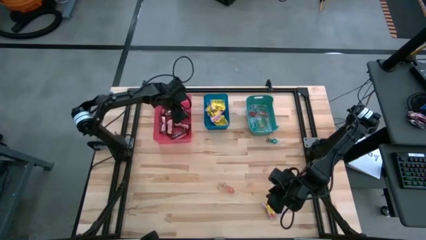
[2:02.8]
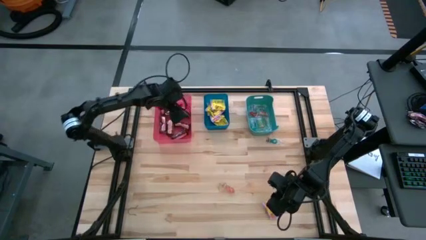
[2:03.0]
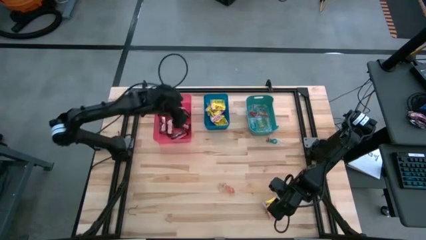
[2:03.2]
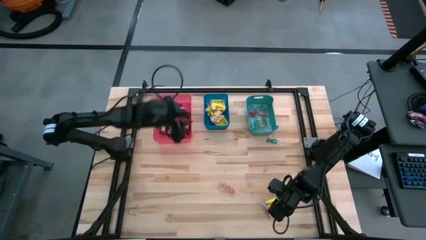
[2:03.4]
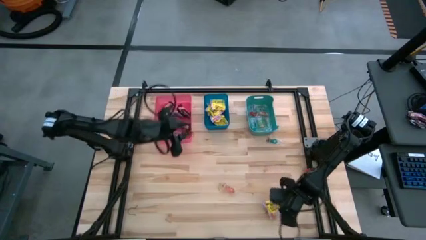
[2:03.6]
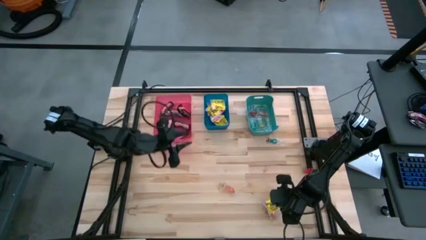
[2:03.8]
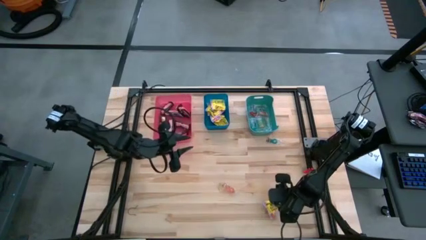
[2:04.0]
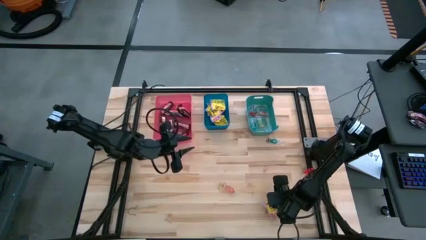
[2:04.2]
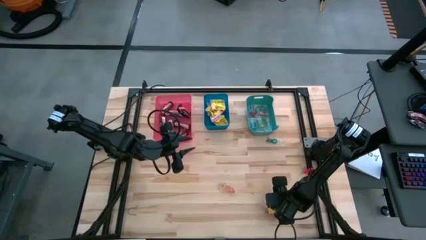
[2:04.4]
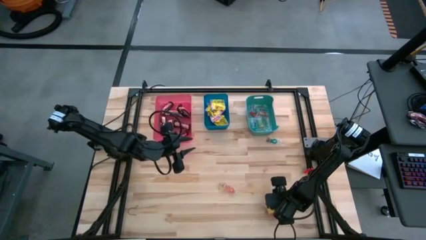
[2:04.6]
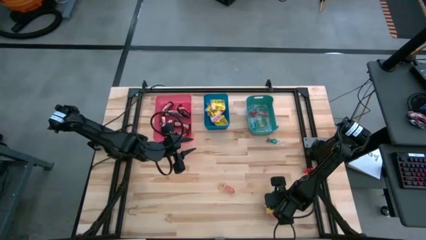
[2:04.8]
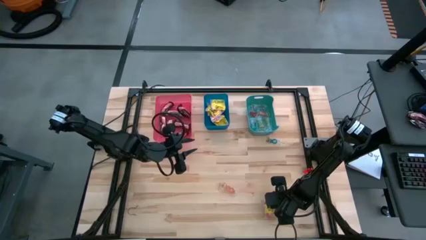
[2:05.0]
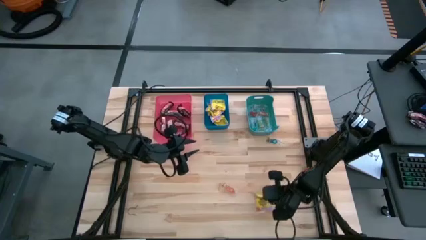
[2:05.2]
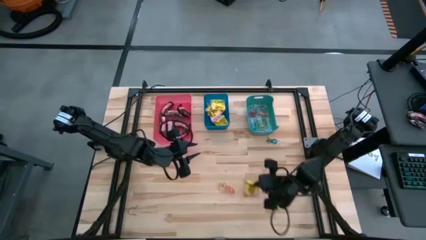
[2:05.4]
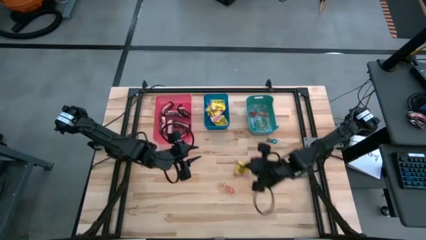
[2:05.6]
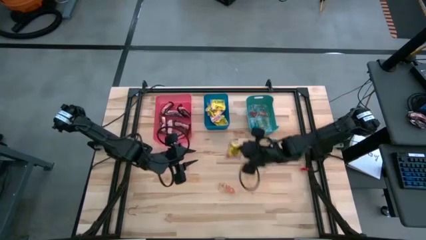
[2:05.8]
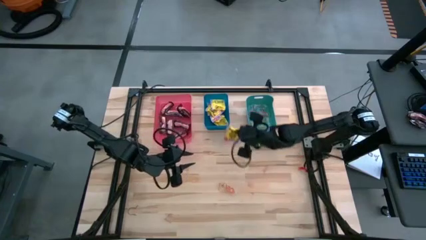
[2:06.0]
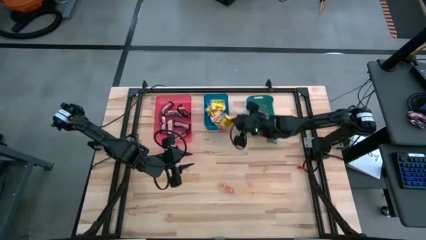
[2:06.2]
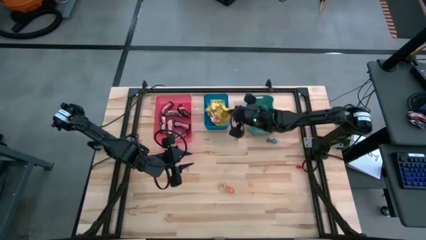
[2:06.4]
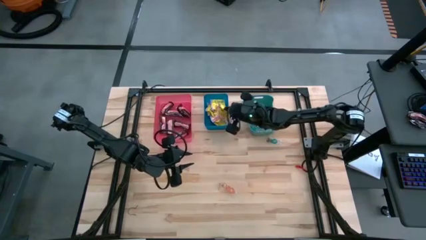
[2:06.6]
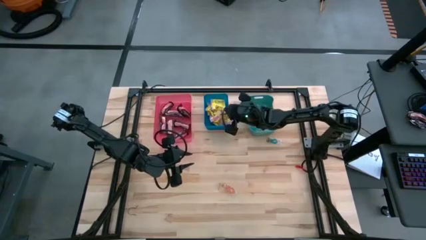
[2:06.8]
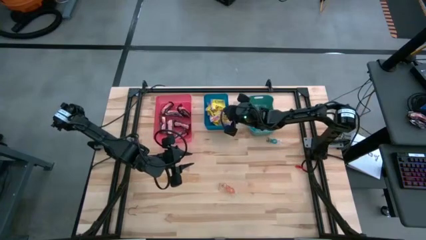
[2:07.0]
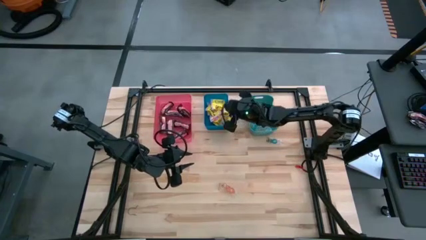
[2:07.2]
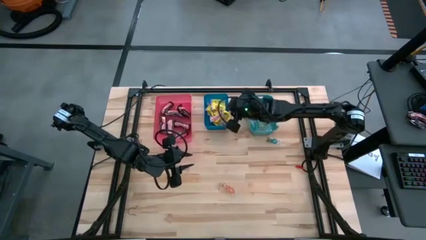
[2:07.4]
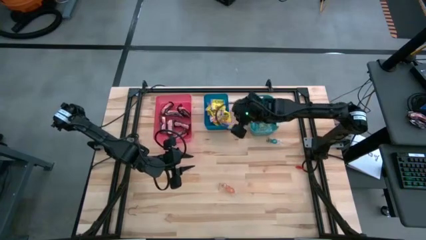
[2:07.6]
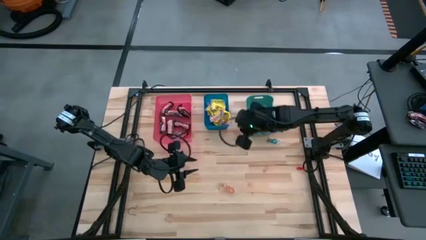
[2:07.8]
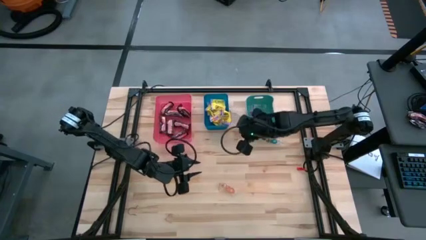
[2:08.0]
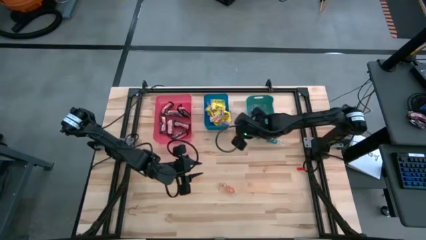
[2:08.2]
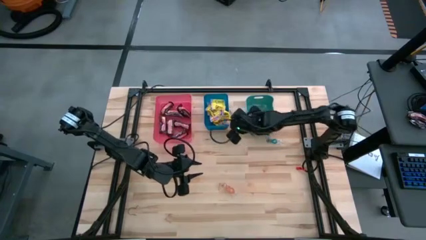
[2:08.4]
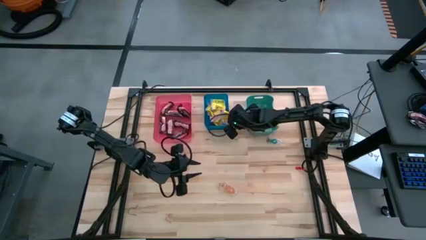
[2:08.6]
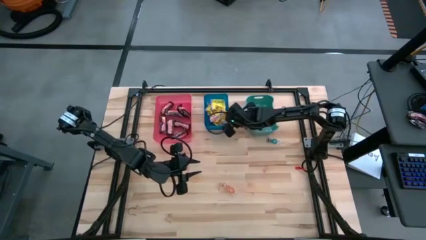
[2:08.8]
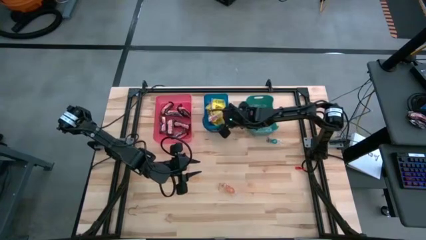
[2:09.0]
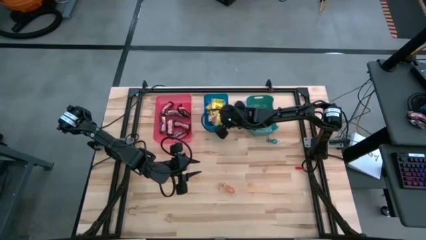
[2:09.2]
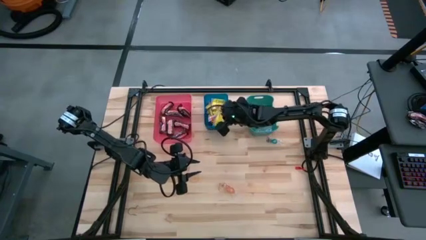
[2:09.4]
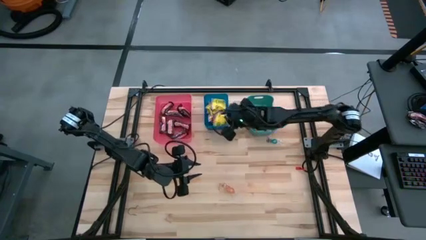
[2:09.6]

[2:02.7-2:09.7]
Task: Sort candy
Put the yellow candy into the blue bin

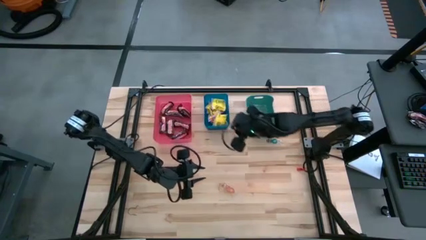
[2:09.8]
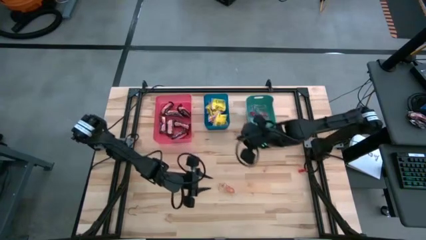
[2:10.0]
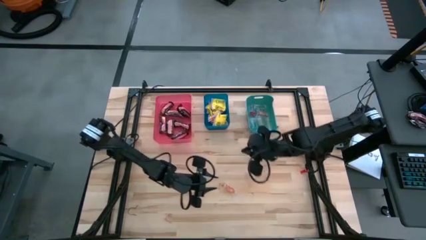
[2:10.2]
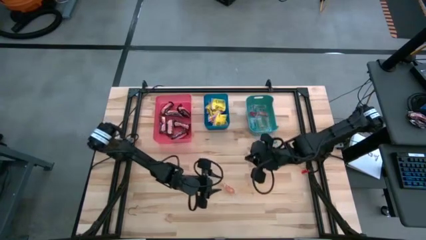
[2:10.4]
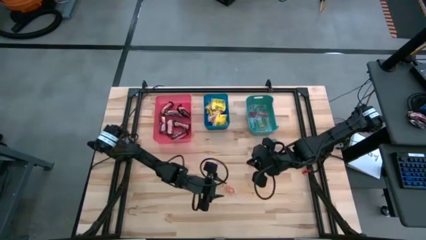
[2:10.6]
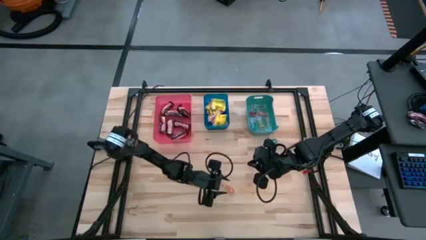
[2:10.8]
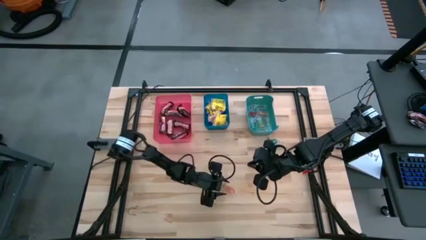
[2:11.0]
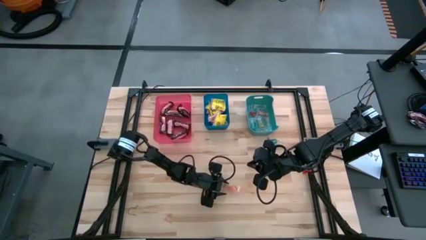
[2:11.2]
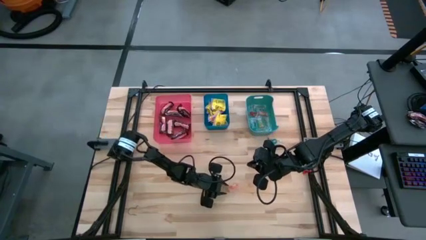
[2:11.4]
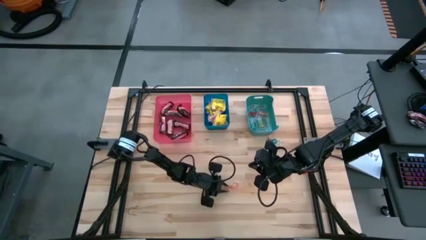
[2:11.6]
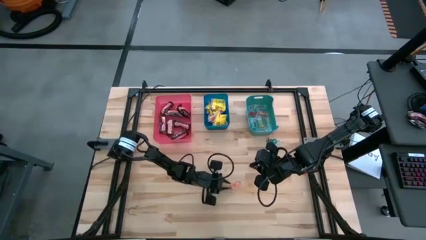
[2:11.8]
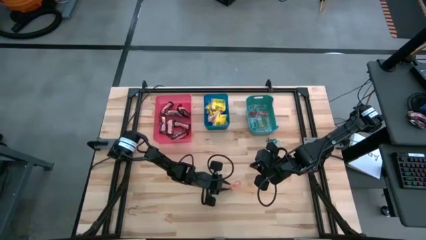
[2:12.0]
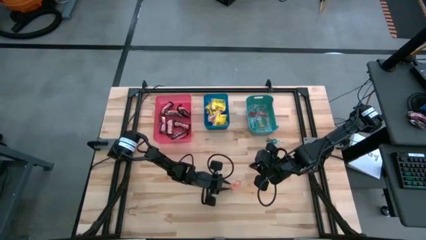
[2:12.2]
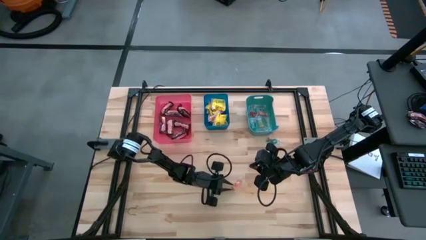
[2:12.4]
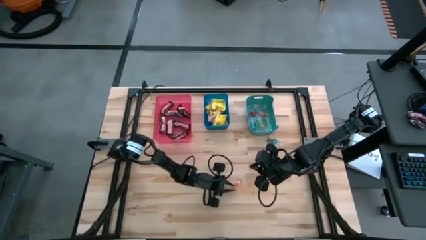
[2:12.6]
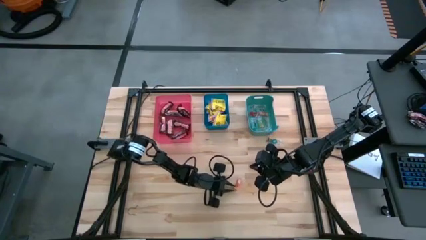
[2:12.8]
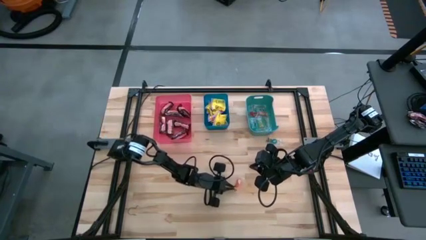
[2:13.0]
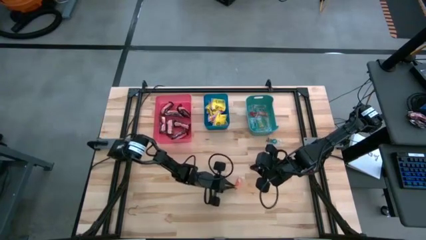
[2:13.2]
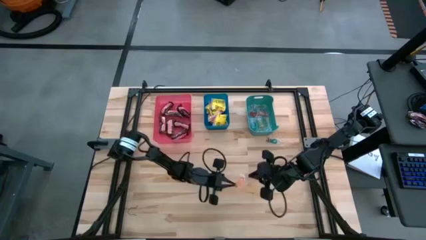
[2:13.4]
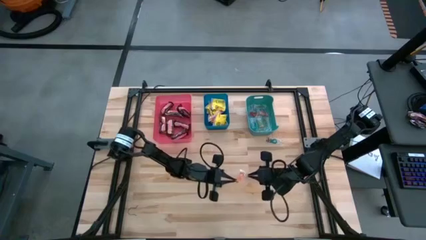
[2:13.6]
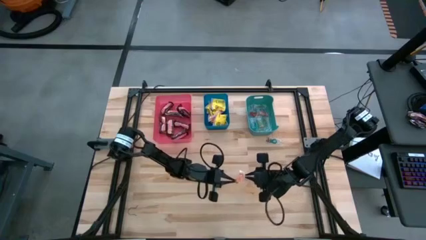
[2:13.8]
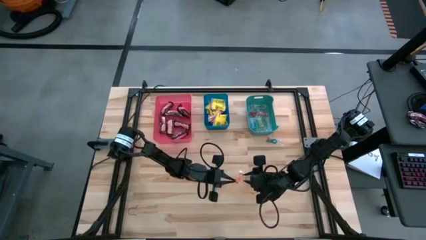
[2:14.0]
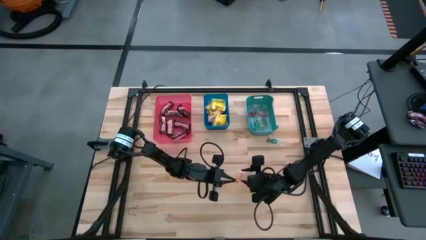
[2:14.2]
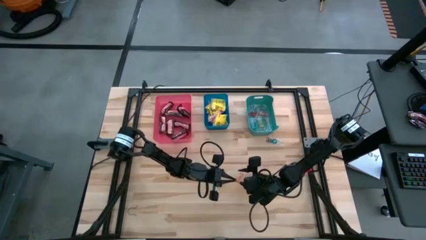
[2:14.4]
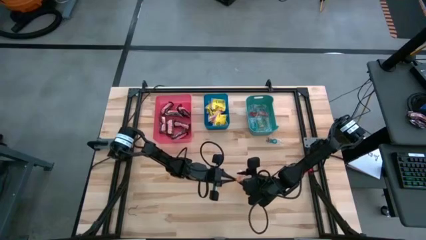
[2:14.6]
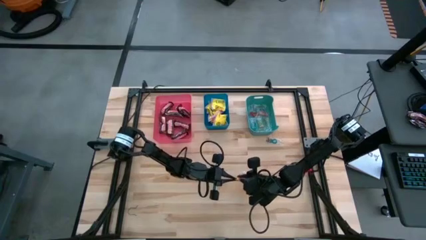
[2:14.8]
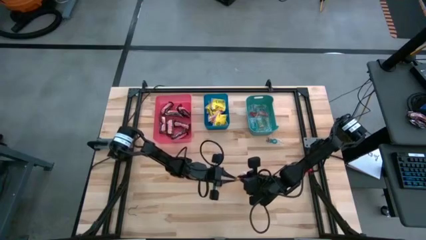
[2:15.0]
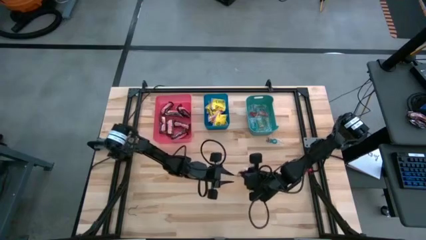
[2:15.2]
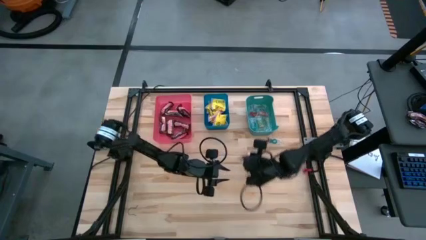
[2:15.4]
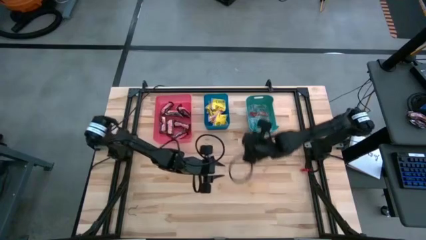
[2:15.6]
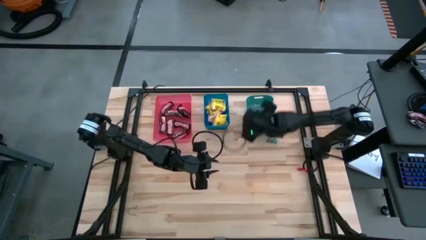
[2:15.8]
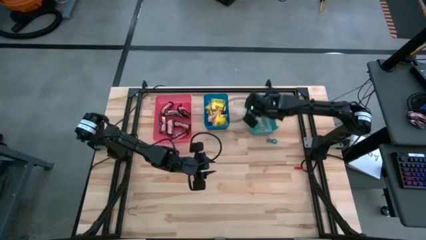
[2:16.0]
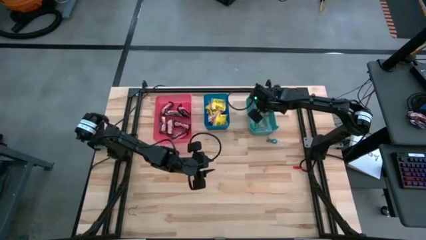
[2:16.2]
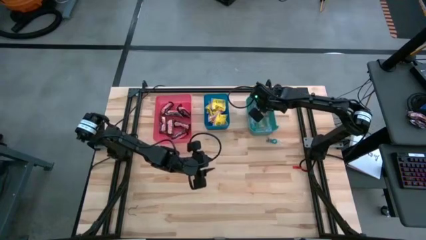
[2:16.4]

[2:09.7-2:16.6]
Put the orange gummy candy into the green bin

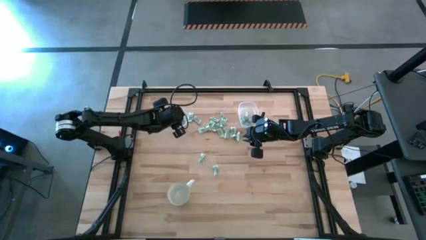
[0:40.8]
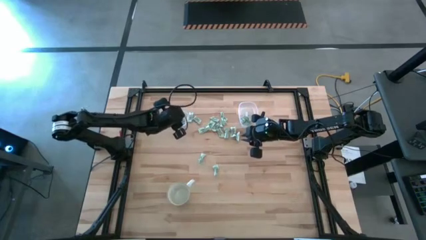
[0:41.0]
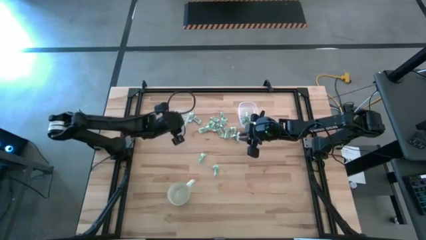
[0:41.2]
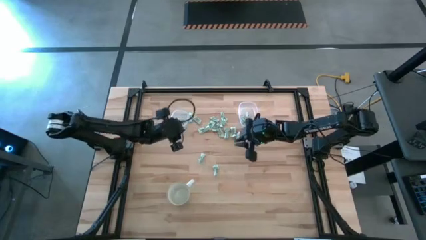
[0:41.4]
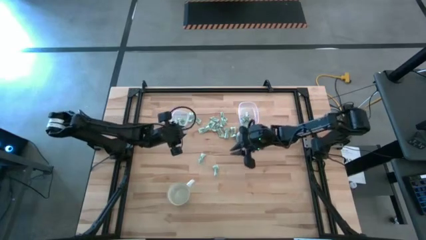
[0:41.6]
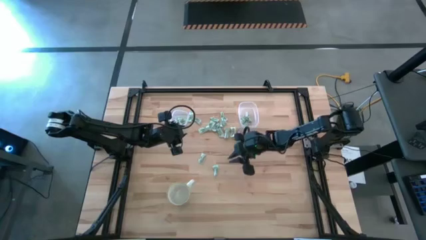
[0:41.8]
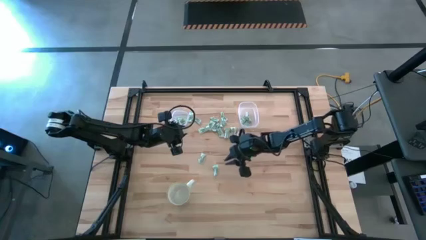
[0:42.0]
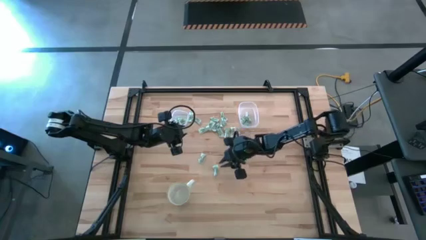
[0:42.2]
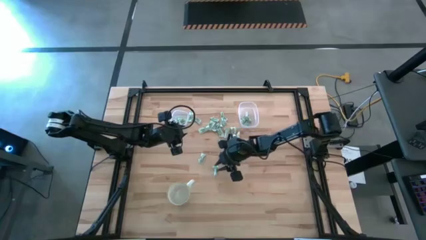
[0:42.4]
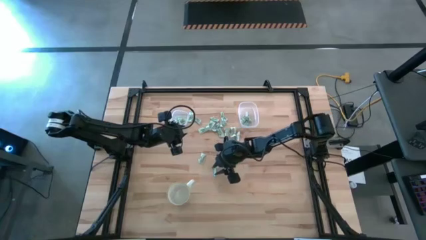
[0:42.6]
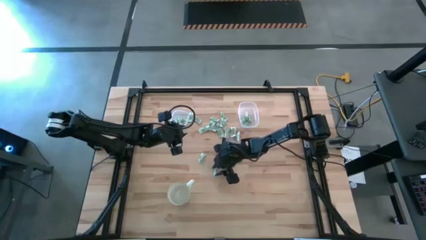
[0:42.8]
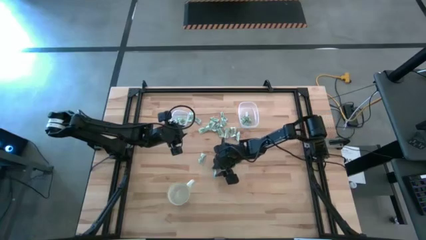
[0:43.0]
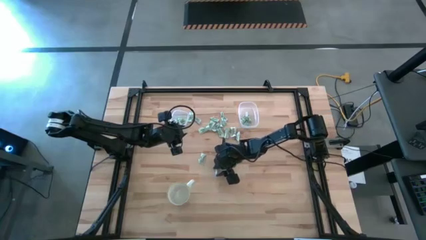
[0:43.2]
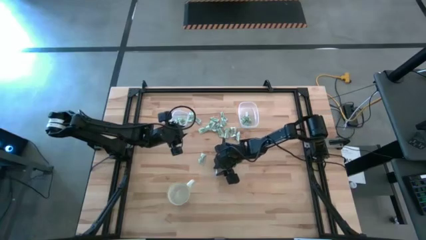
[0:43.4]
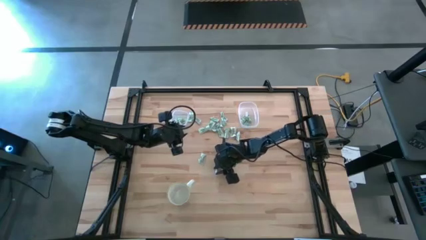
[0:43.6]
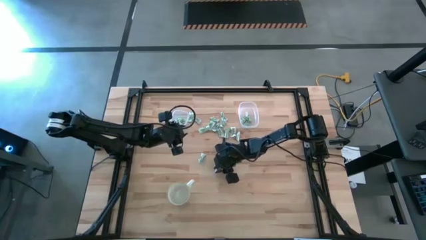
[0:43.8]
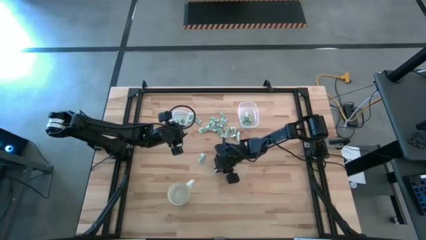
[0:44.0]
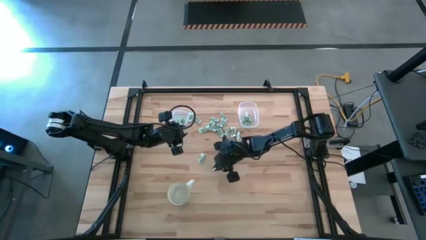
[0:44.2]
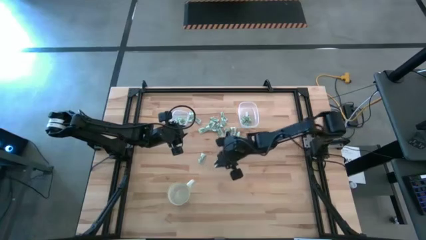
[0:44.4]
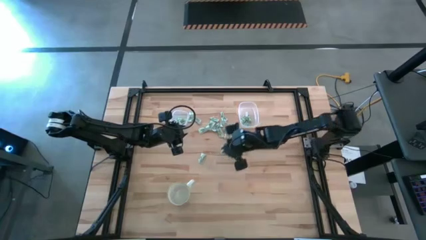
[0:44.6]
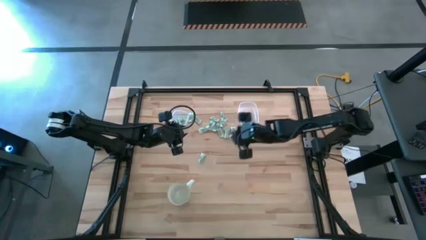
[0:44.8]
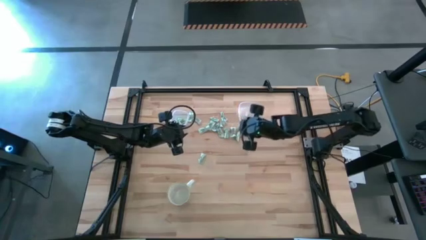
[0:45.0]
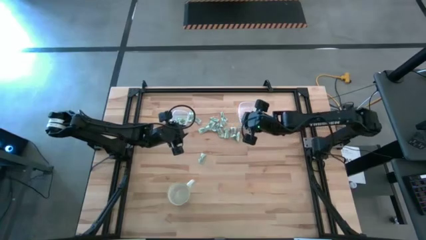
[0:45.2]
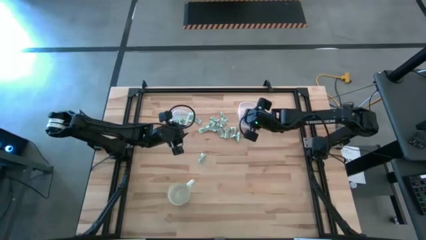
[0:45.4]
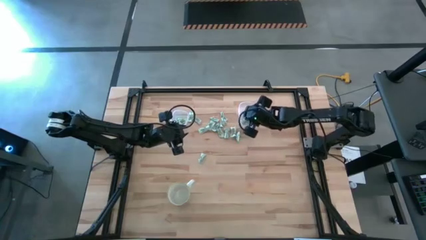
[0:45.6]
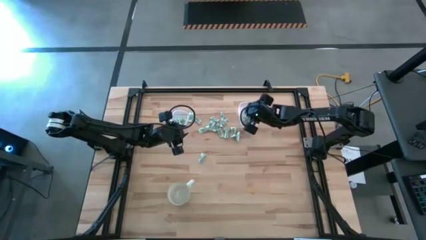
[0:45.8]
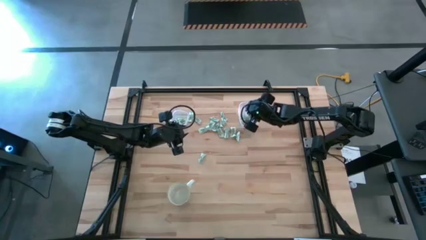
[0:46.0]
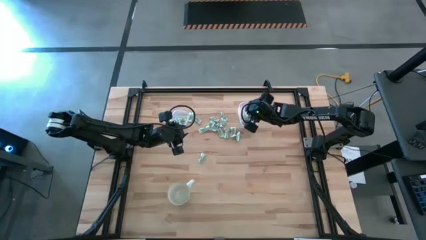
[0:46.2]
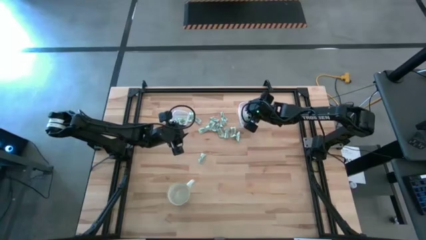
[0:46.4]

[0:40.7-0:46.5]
Task: Pick and place items into bin
Put the green stevia packet into the rectangular transparent bin
